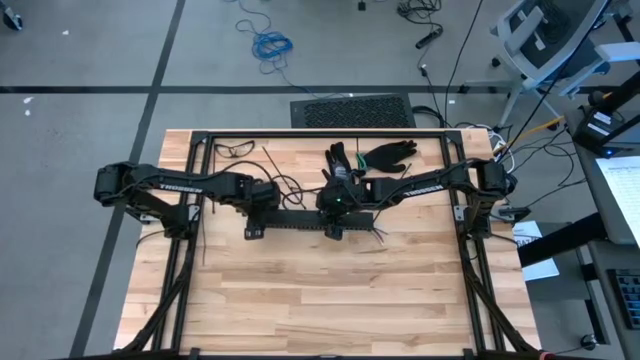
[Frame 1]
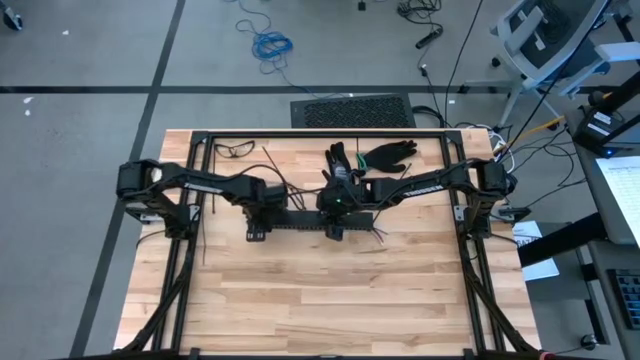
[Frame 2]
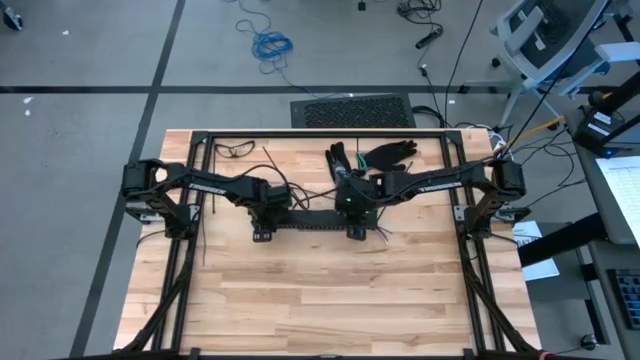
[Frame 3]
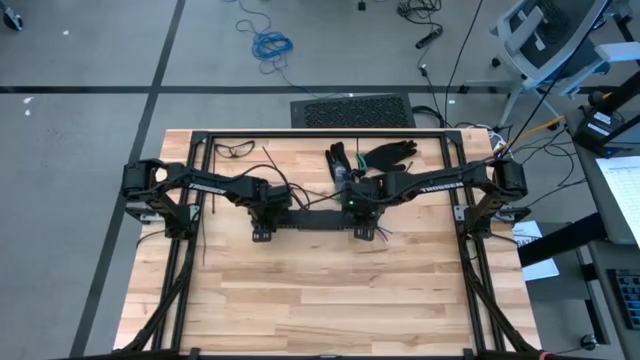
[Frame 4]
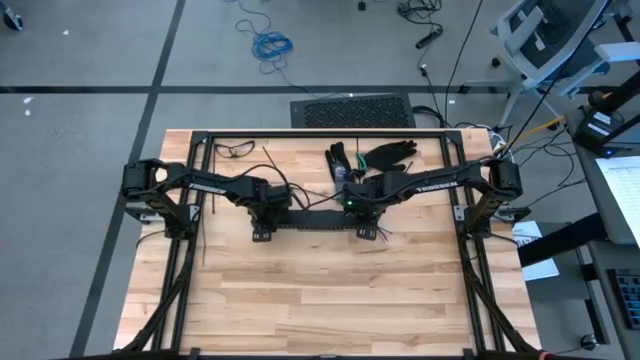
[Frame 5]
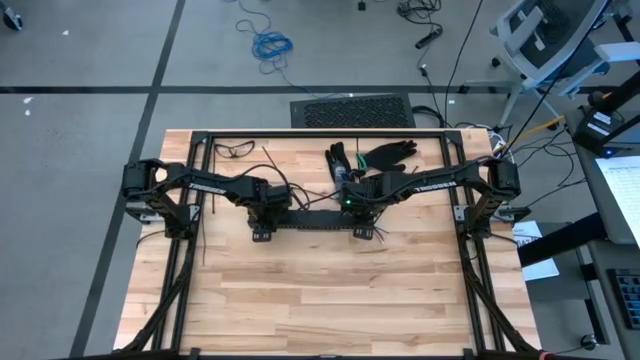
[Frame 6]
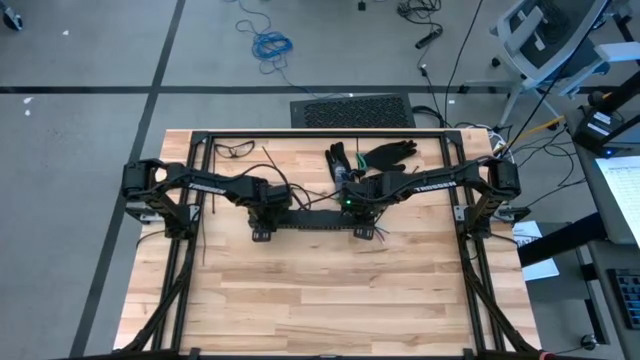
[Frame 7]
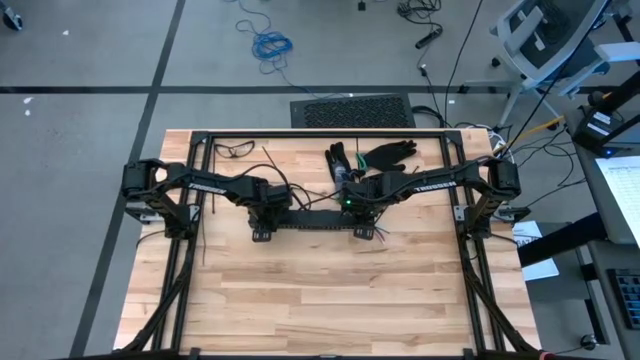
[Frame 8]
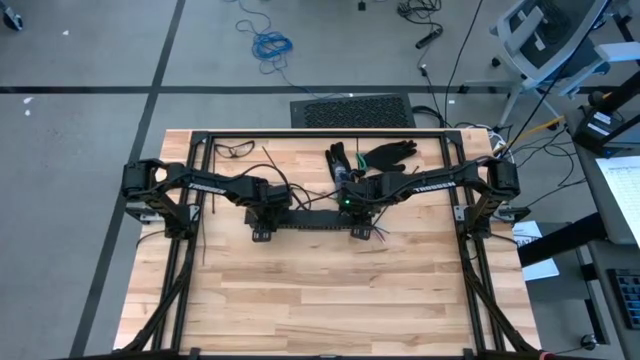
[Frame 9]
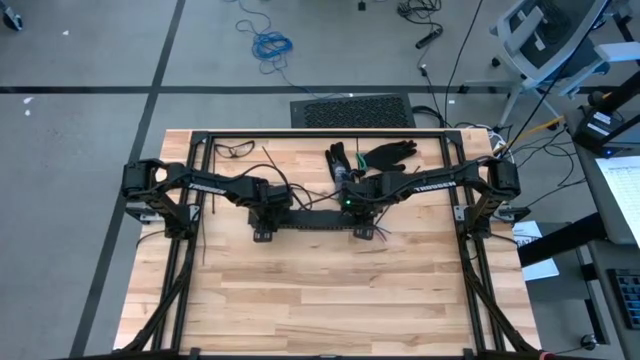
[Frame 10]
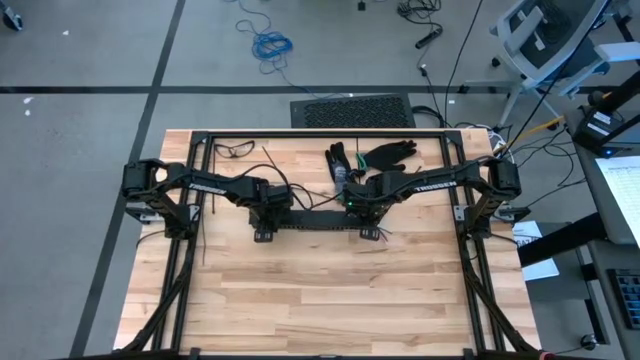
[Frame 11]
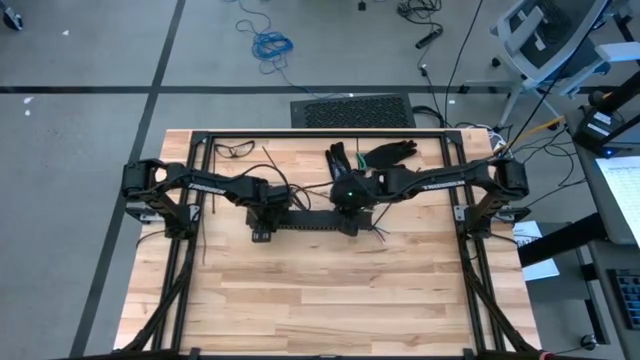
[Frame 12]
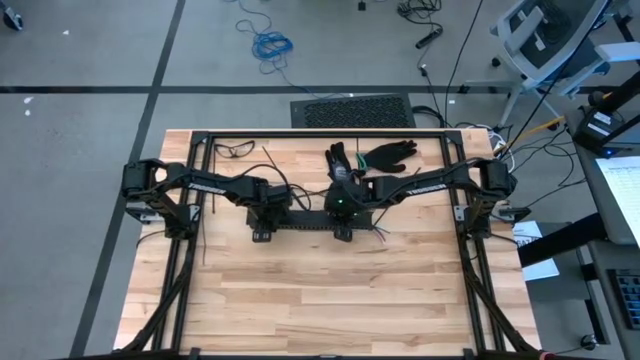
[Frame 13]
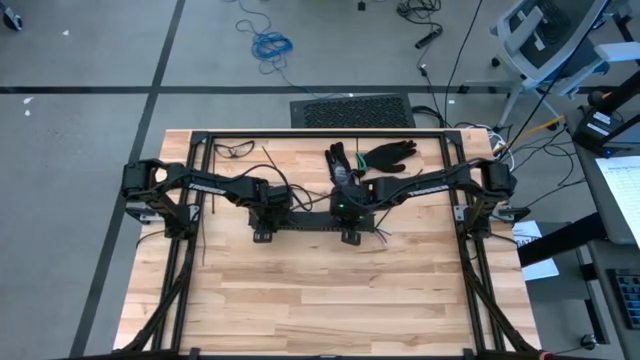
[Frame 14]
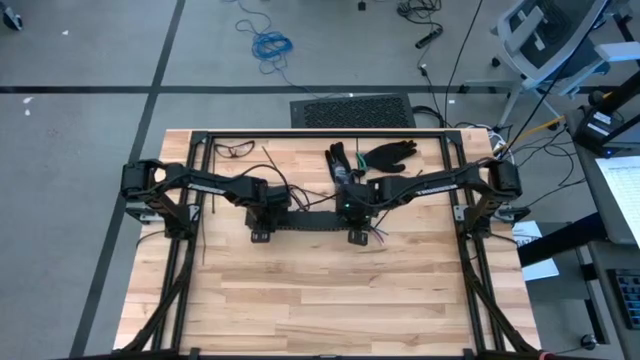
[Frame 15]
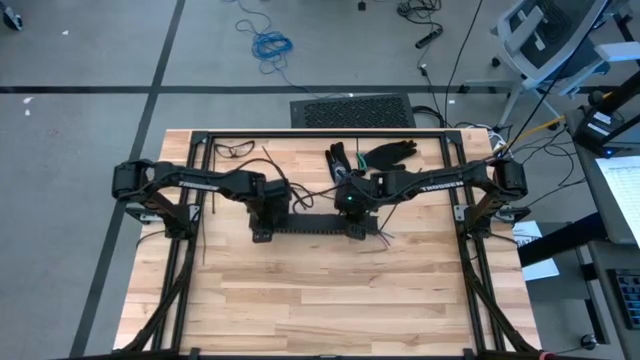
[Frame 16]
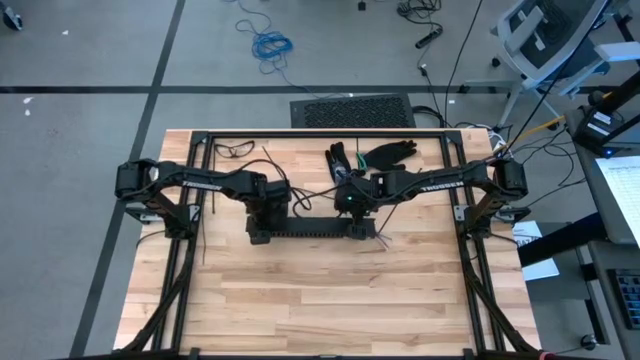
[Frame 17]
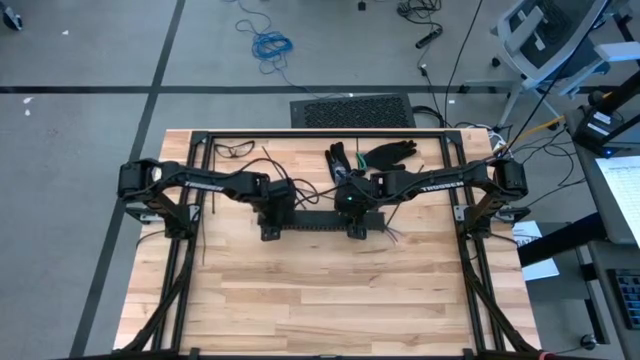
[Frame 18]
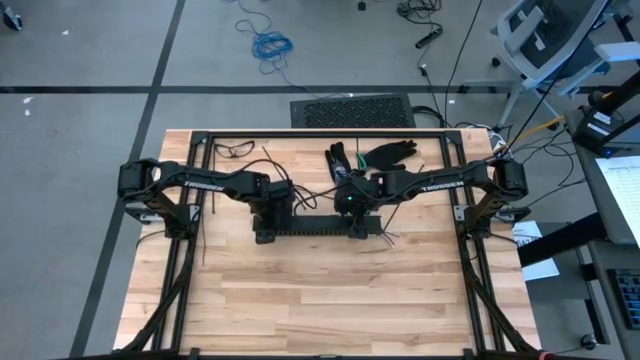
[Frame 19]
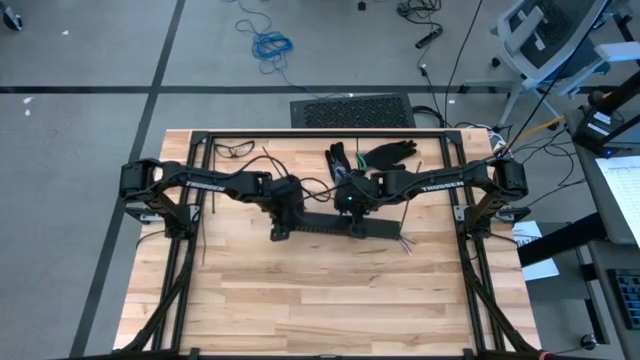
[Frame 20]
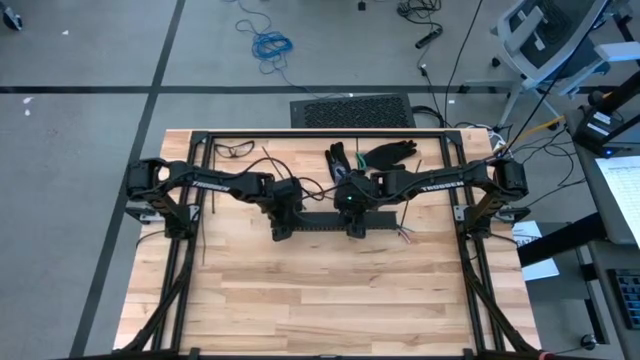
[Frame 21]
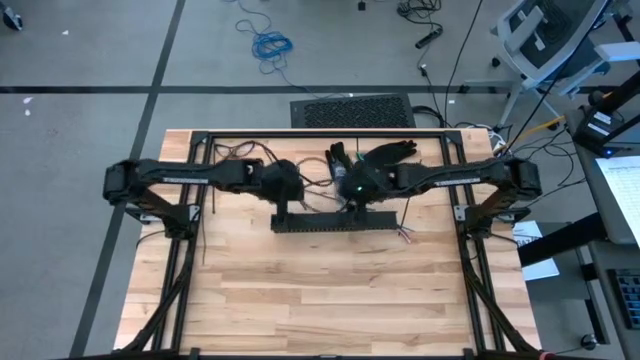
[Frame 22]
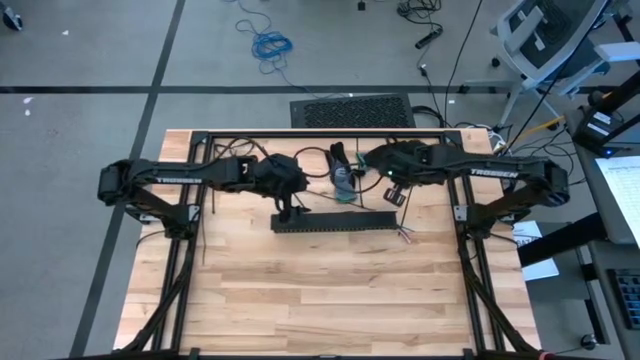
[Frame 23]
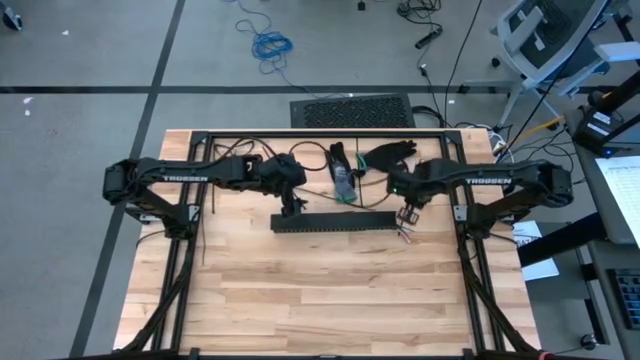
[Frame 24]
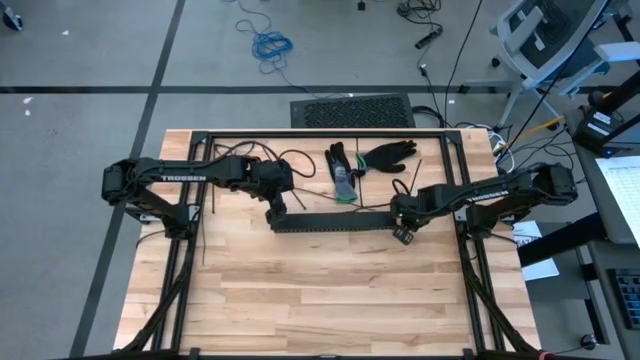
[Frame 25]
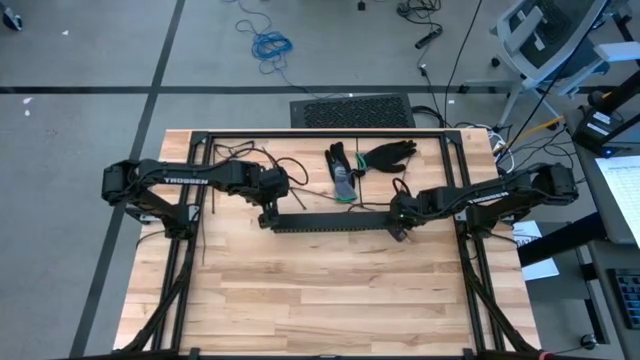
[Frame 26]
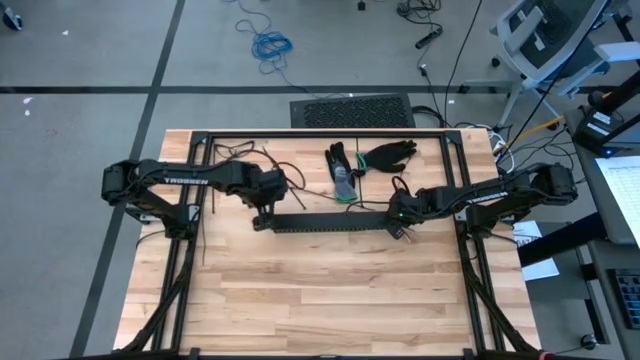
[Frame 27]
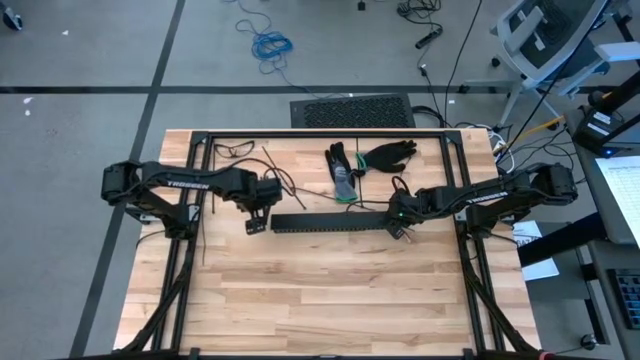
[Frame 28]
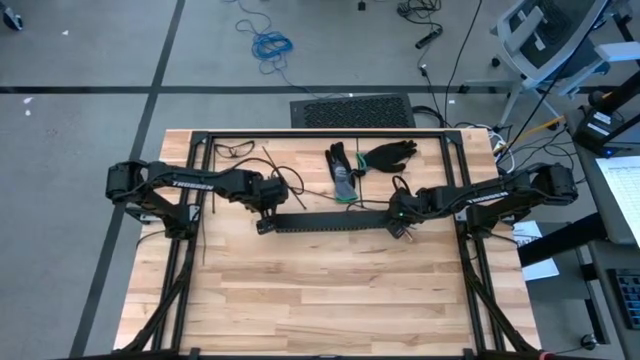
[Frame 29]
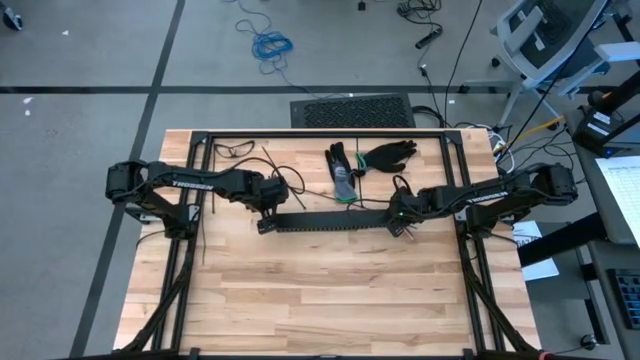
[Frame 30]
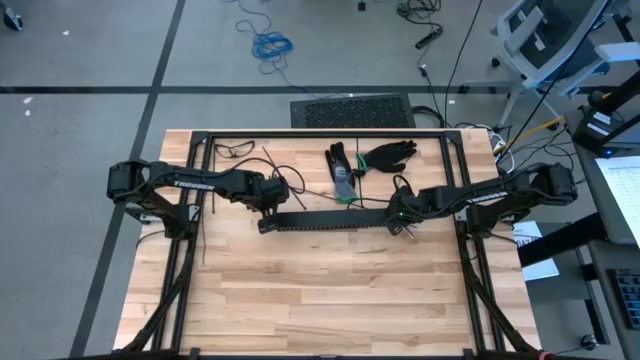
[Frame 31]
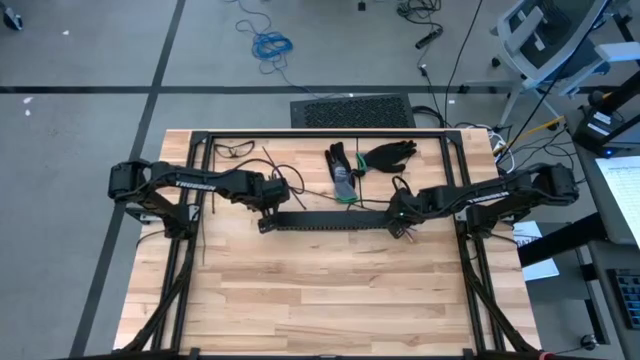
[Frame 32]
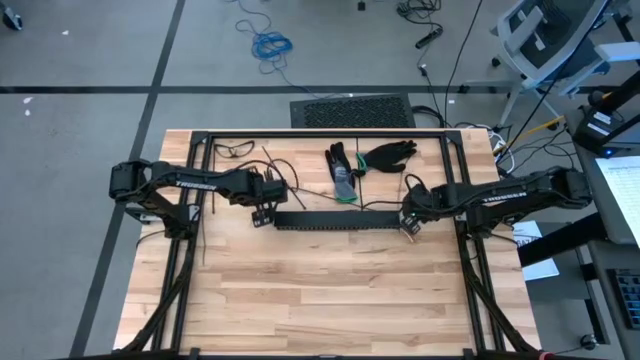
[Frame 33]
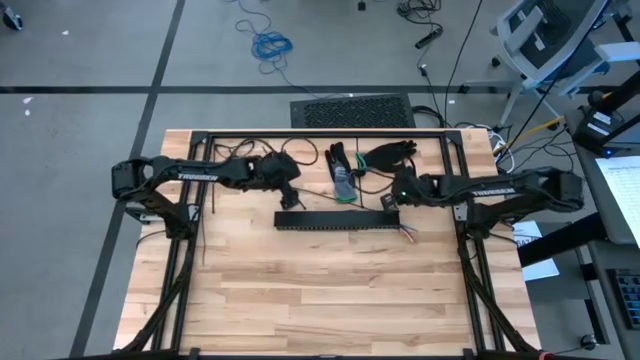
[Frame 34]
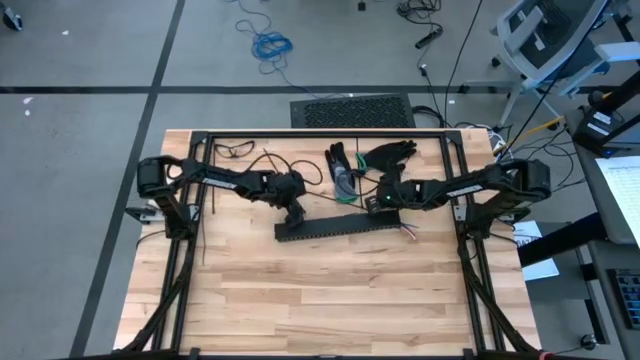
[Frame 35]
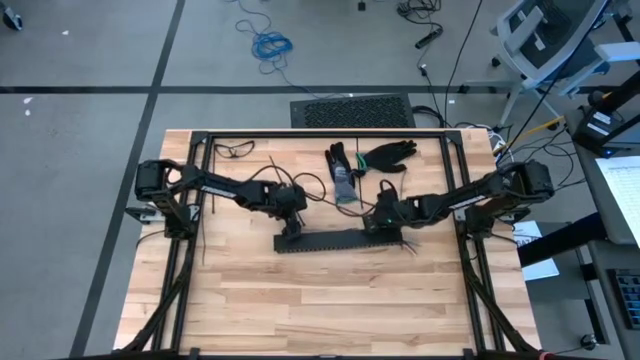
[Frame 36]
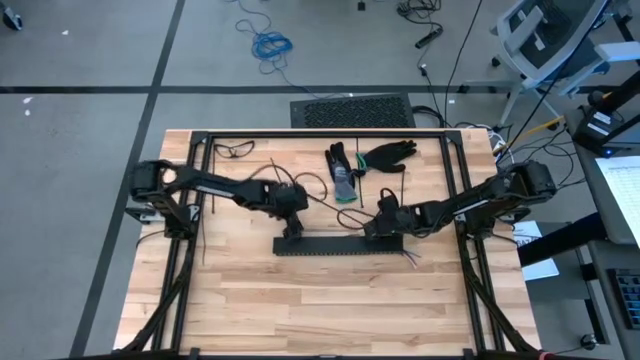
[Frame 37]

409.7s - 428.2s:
Task: Ziptie cables
Close the black cable duct

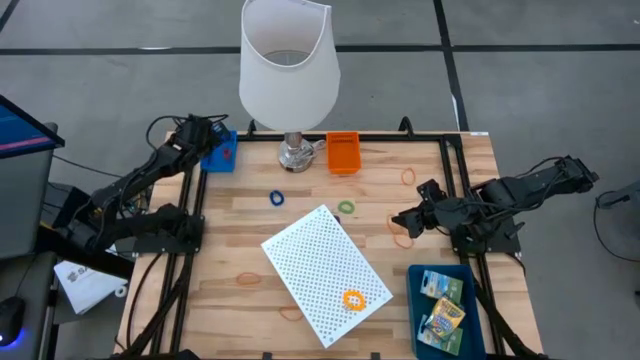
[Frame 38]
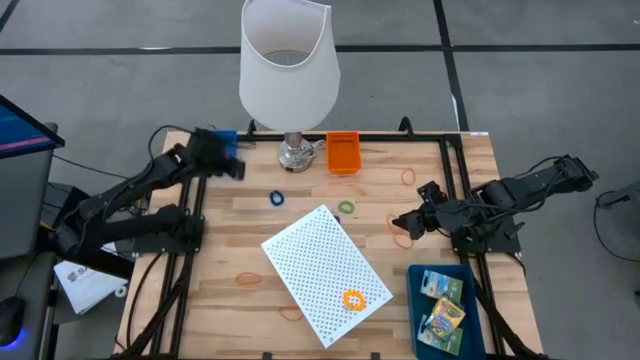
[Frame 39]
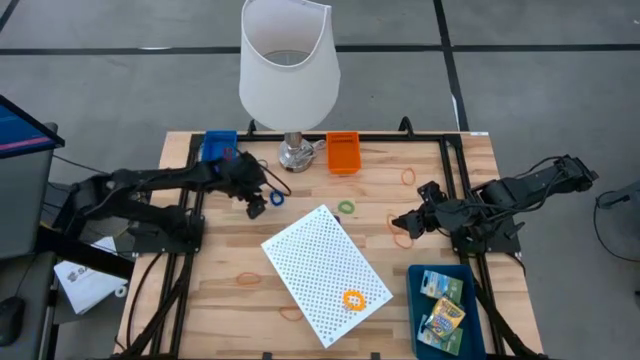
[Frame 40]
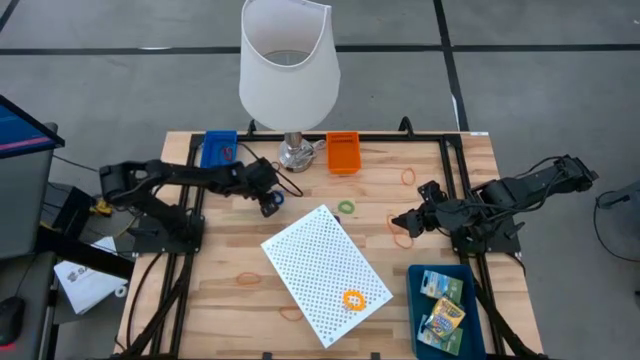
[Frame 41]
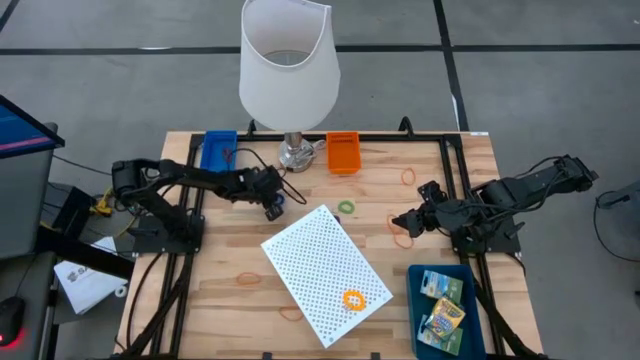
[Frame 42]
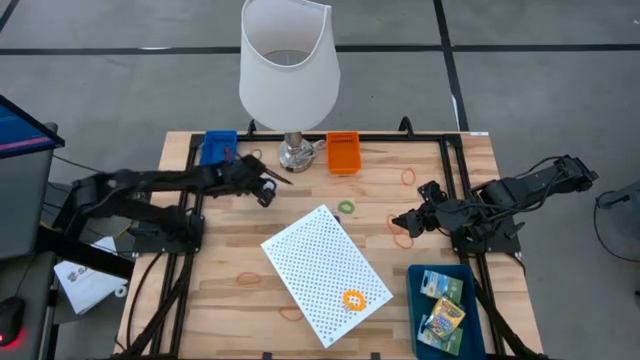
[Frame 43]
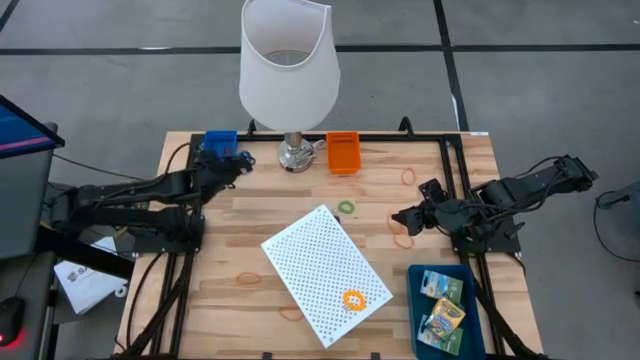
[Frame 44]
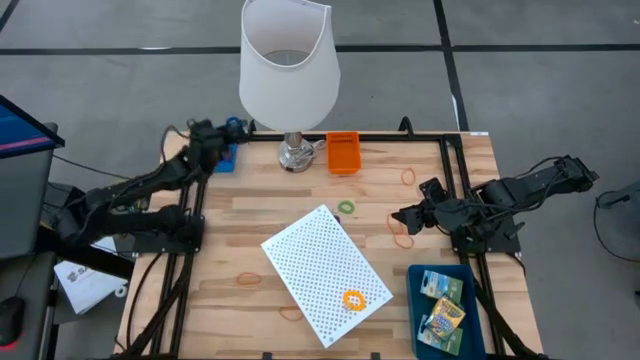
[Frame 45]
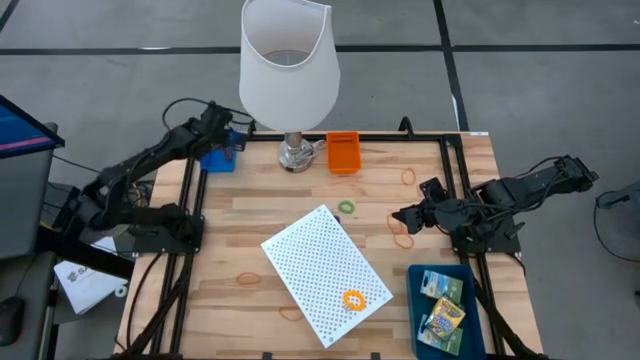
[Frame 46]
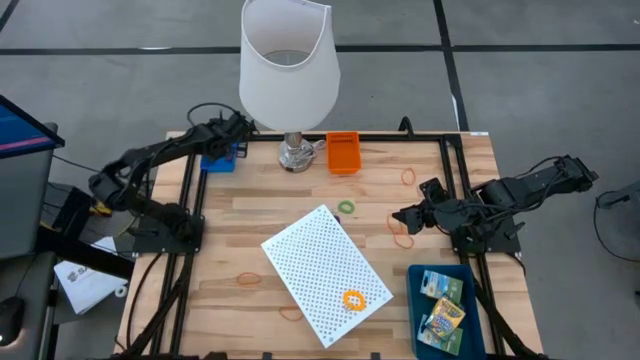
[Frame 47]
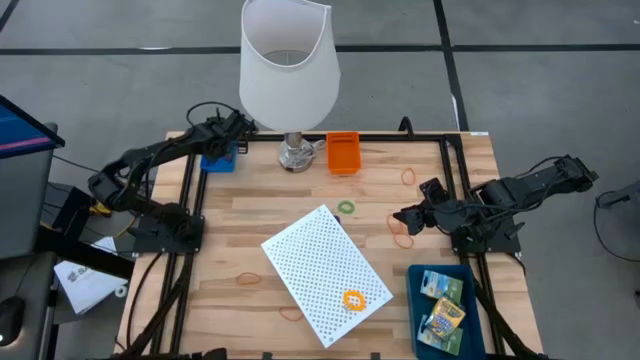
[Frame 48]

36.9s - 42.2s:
Task: Pick & Place Office Desk Supplies
Put the blue spring keychain into the blue bin
